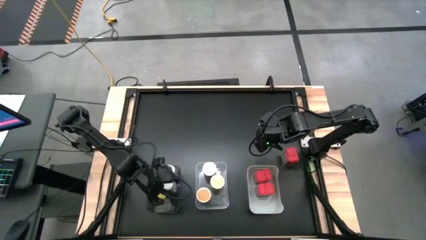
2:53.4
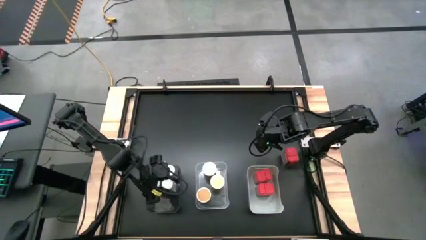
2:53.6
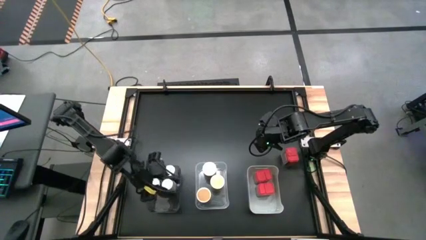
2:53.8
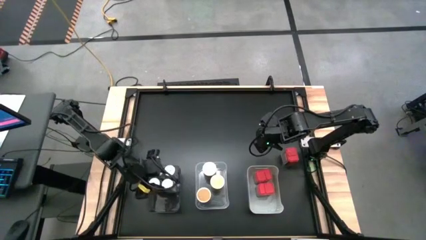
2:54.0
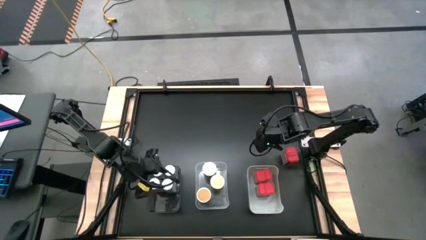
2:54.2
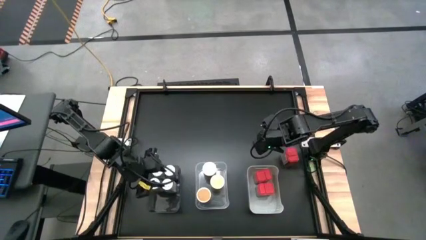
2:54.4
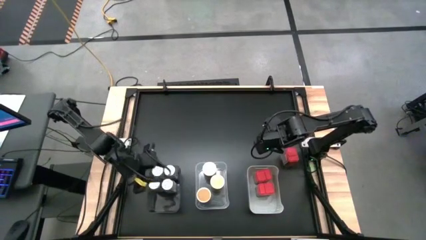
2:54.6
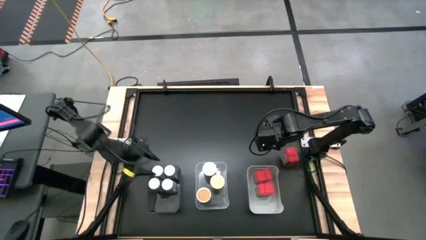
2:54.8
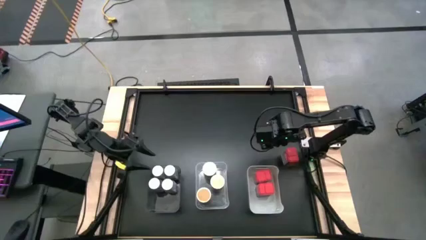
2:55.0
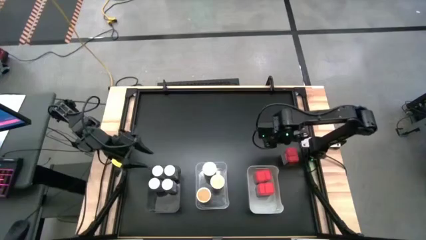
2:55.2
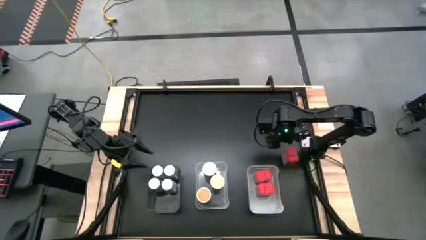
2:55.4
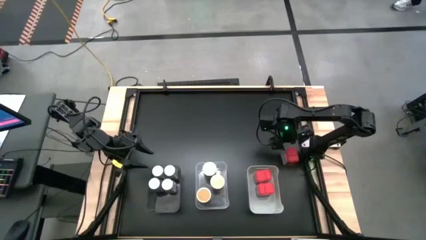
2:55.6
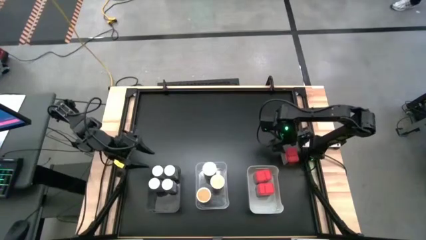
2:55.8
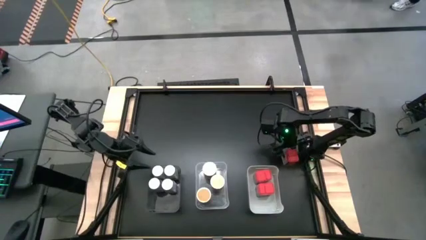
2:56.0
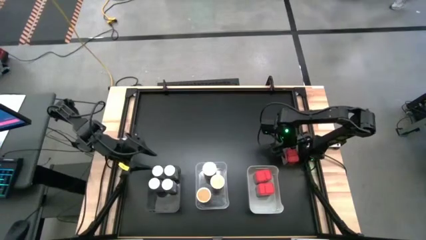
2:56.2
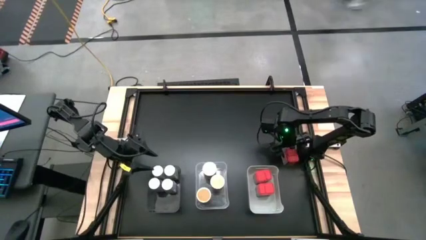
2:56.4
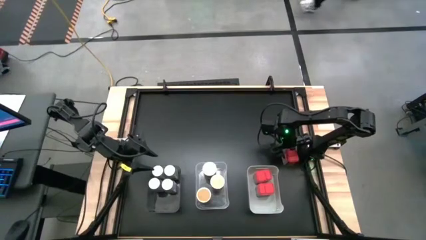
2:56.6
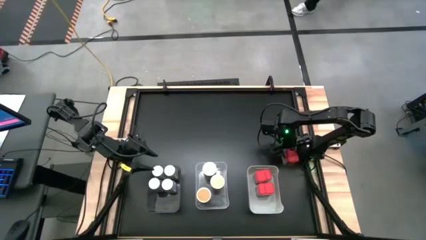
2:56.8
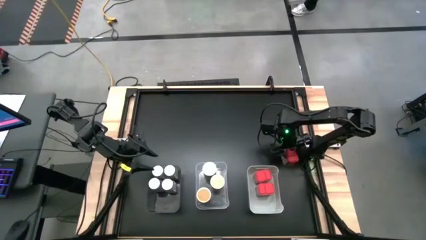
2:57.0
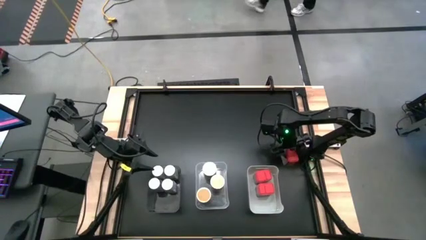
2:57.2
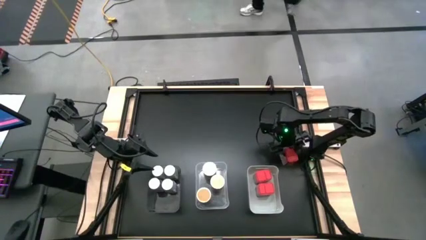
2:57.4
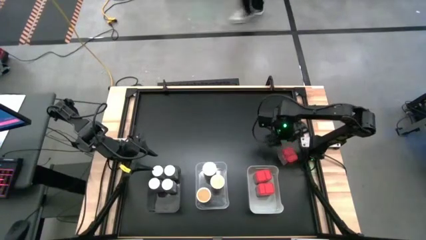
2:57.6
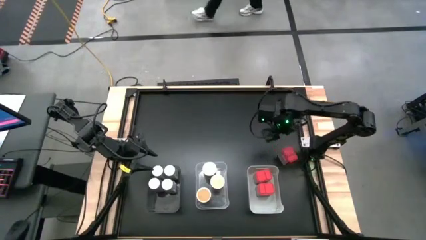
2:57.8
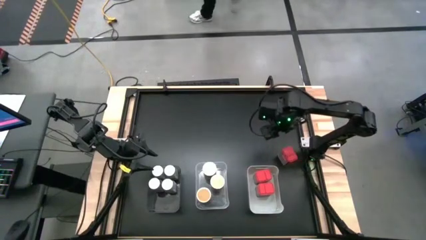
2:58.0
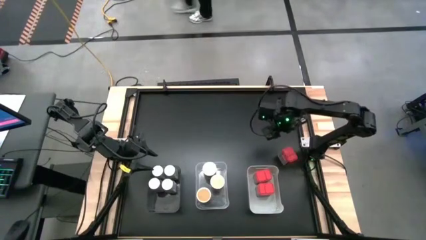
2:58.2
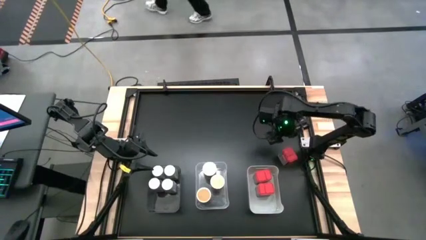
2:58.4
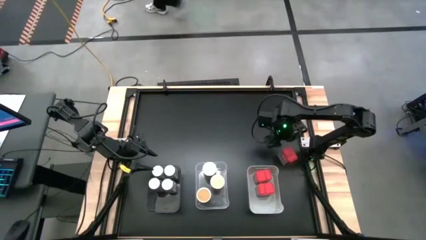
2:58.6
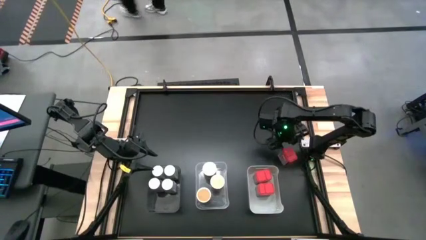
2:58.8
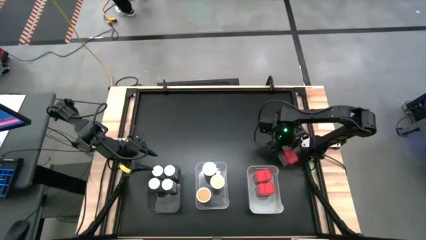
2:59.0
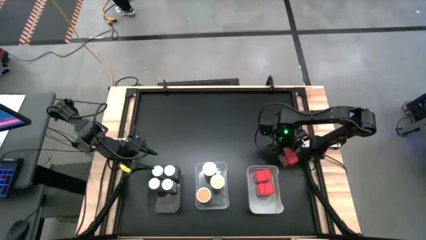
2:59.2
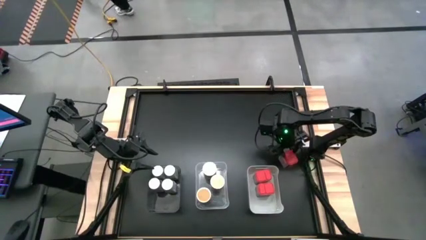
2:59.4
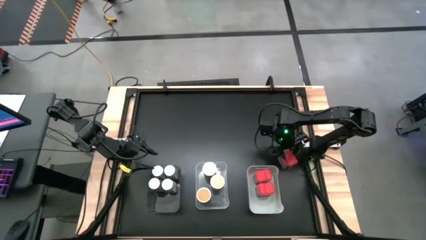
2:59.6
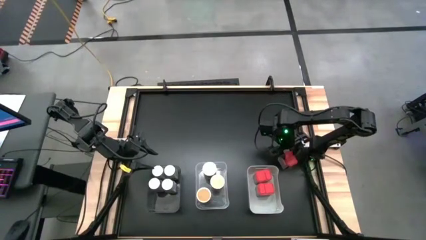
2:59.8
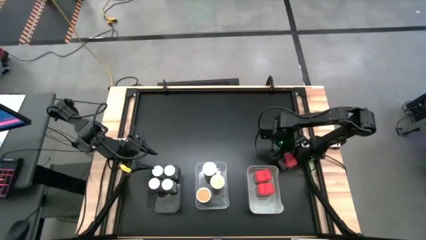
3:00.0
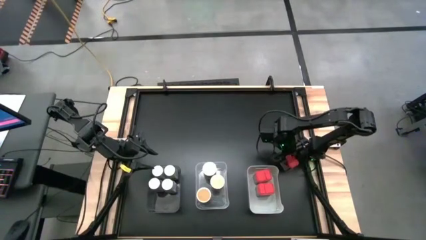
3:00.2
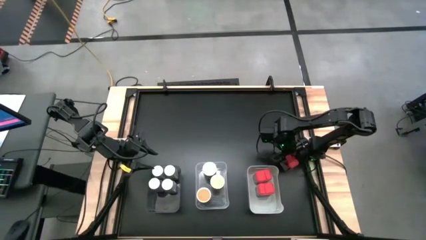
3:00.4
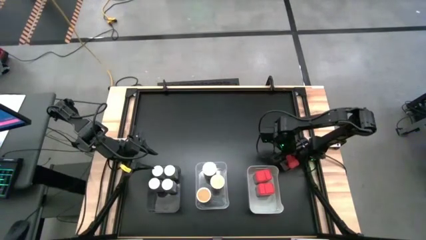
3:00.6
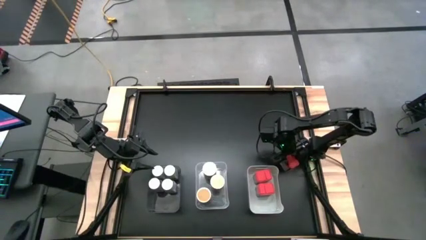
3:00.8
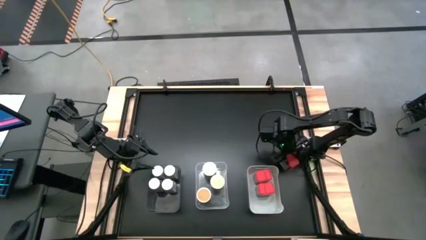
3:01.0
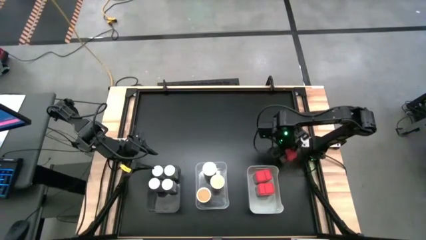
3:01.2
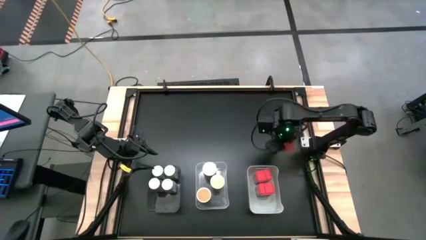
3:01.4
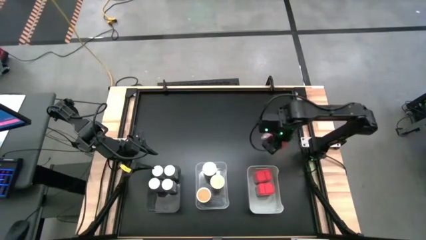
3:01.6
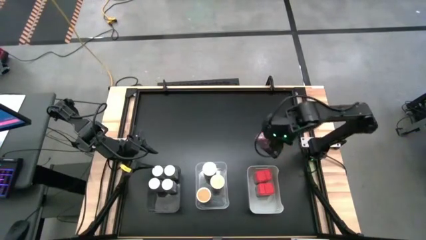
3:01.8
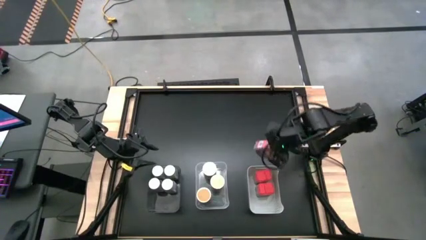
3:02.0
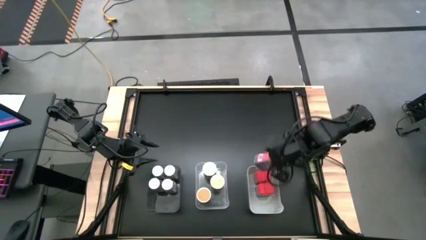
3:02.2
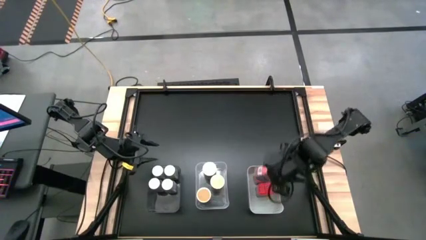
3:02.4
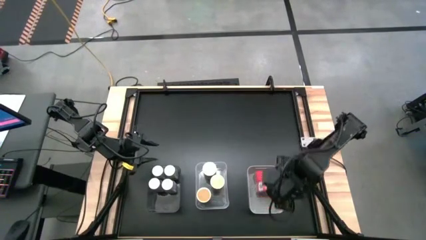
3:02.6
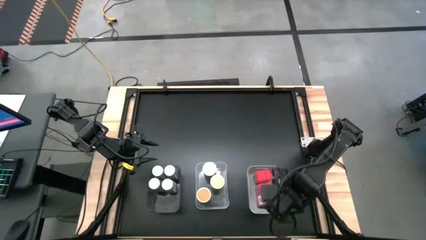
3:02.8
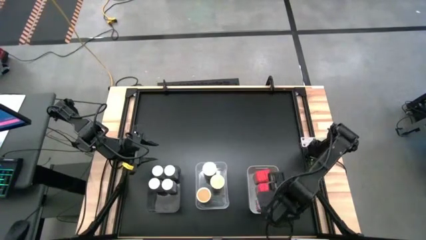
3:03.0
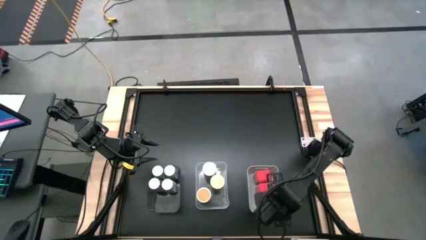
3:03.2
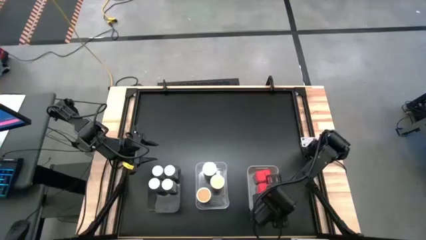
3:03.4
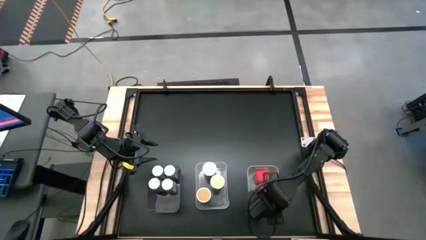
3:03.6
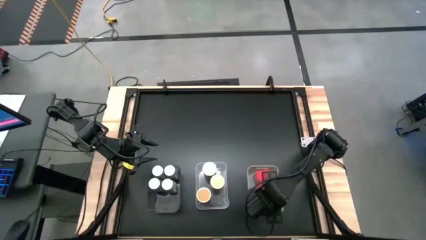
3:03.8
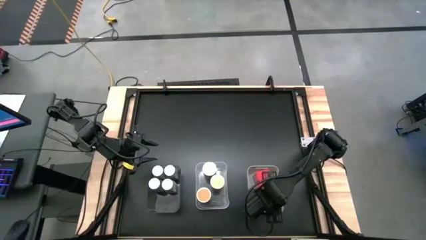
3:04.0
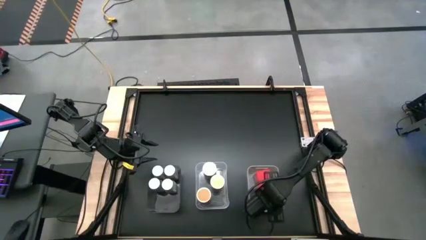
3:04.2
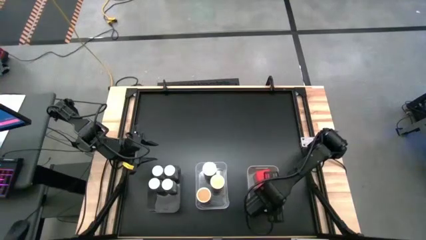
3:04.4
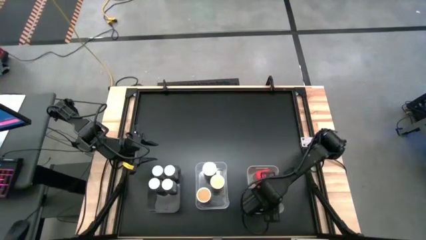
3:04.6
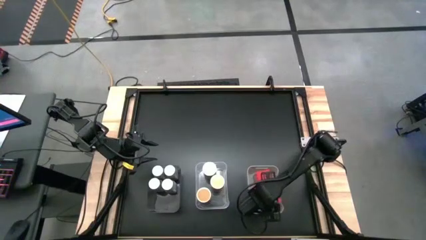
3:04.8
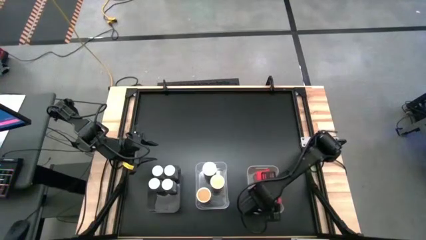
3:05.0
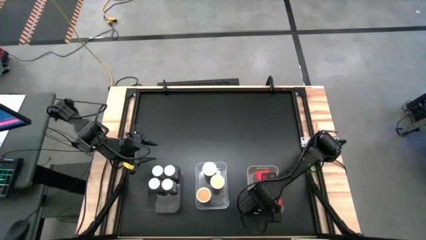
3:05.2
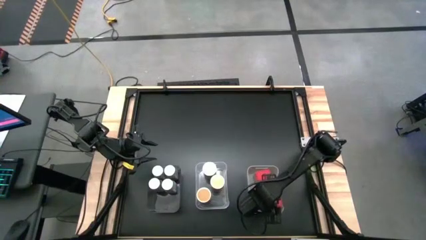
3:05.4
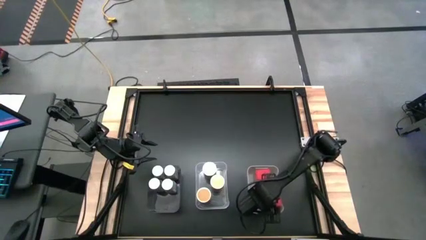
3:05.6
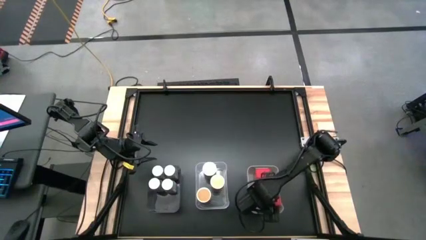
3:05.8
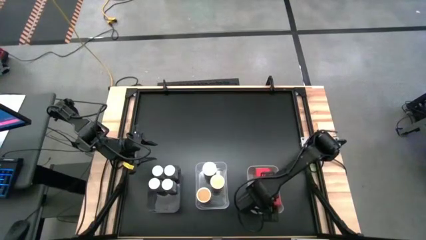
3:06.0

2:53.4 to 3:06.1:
Task: Sort spices by type
Put the red seasoning can into the white bin

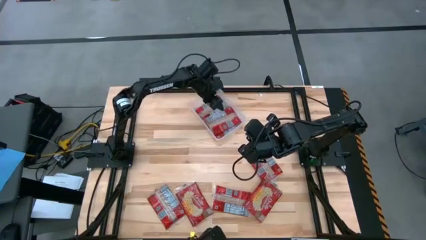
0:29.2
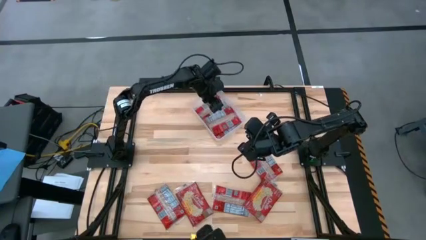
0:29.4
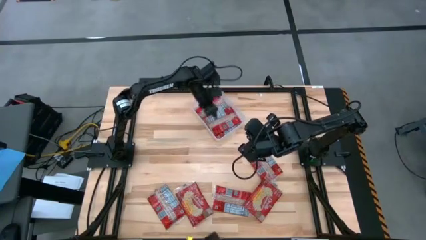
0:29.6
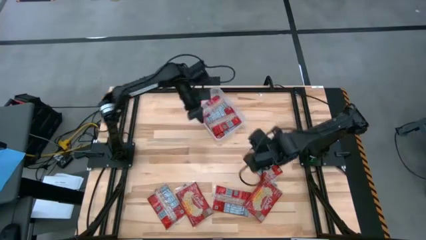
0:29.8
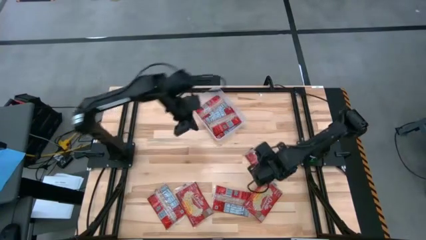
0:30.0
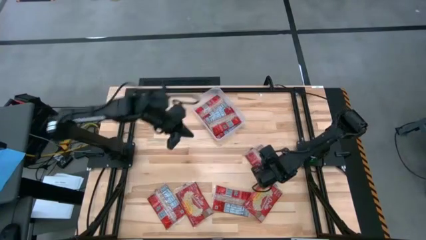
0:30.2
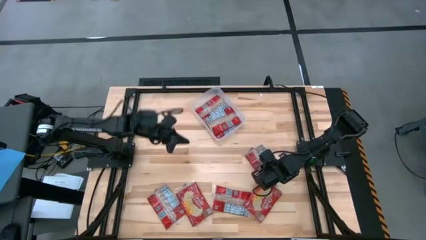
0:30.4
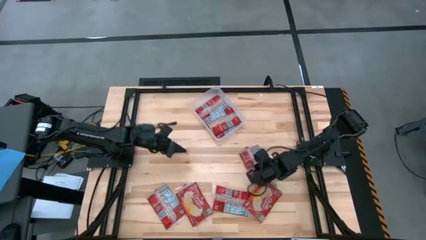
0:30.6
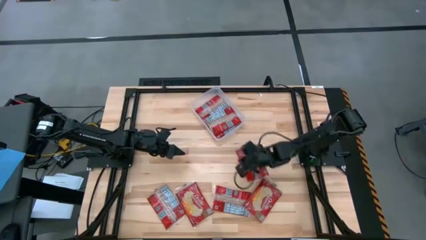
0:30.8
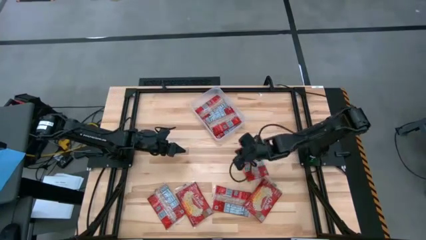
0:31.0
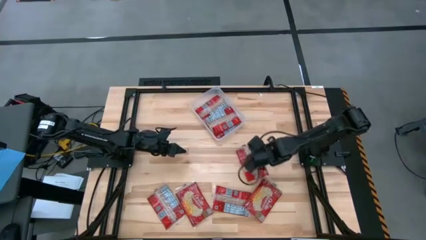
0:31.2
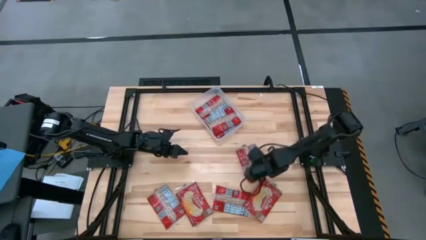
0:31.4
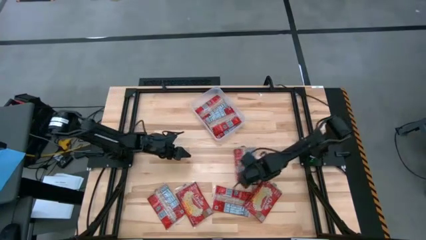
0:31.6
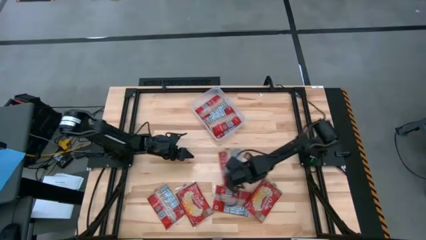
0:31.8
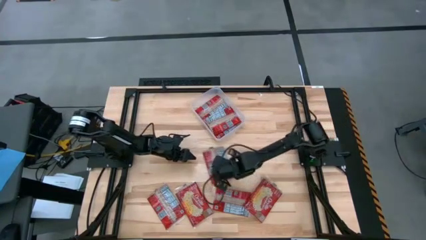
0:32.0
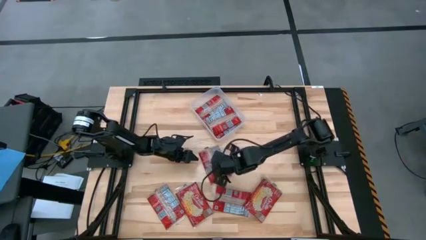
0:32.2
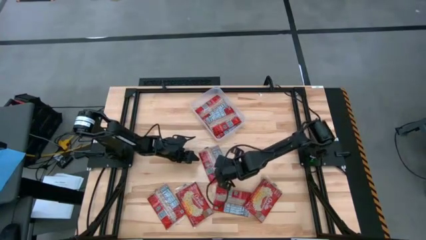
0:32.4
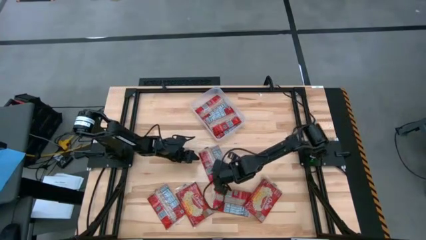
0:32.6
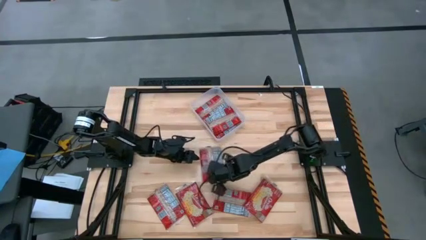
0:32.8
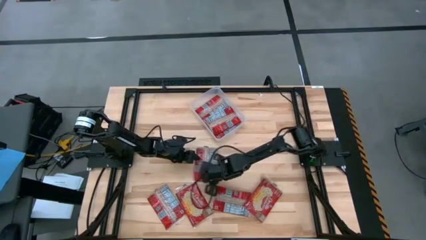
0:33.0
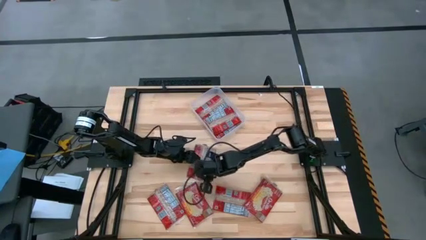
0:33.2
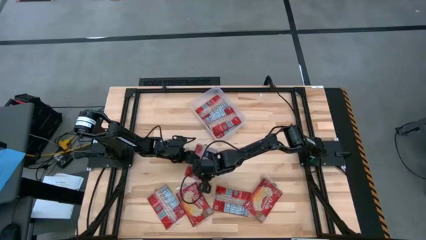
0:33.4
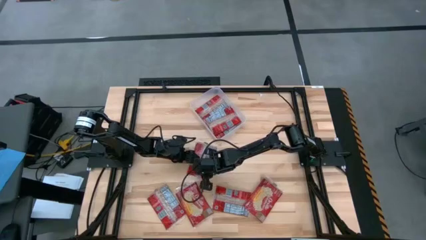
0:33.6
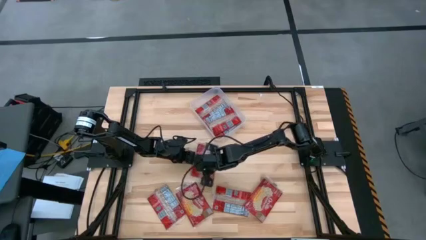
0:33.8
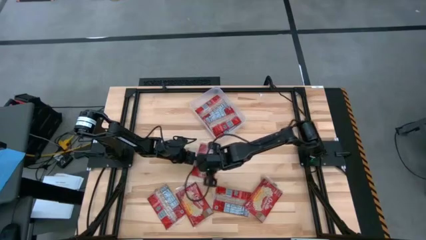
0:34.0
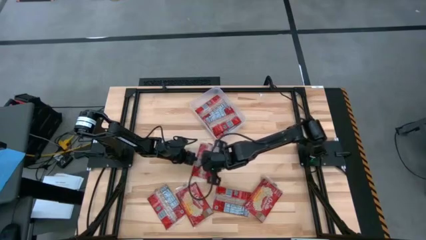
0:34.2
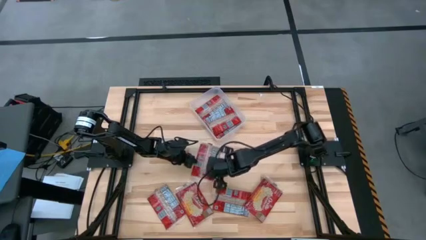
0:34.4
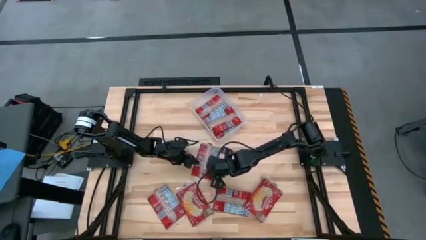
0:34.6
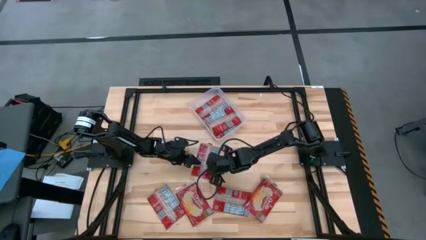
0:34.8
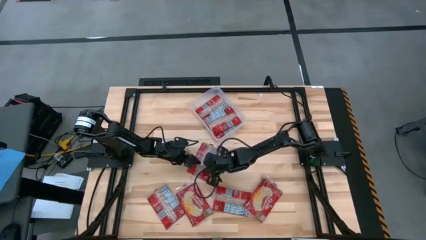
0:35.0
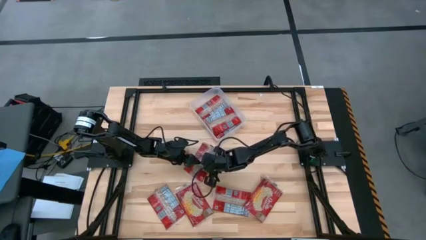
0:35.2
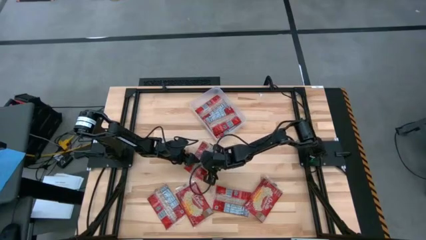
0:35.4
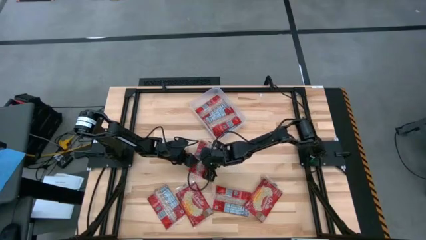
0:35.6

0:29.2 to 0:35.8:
Task: Sort popcorn bags into baskets
Put the red popcorn bag into the white bin
